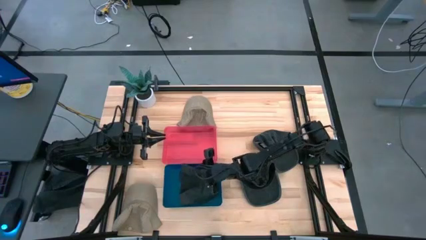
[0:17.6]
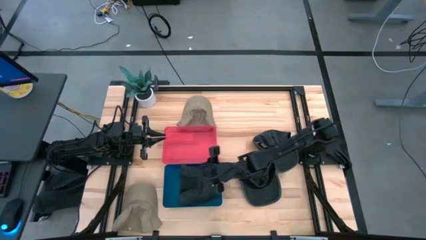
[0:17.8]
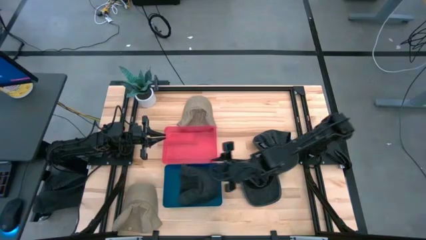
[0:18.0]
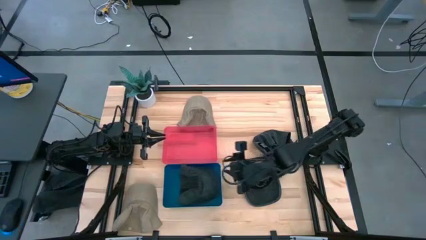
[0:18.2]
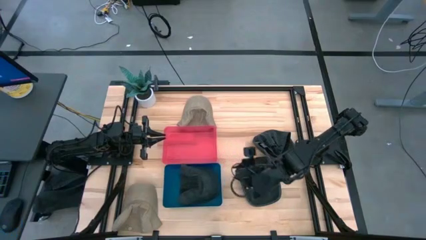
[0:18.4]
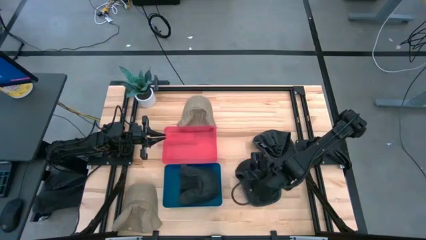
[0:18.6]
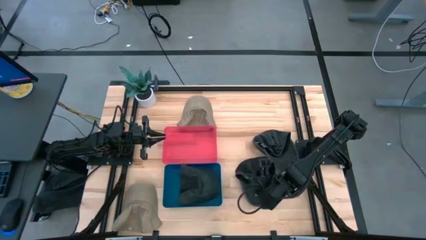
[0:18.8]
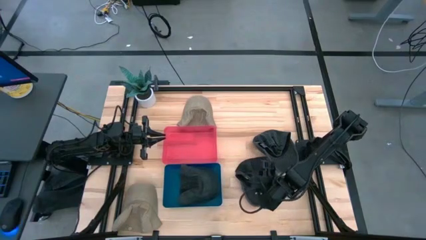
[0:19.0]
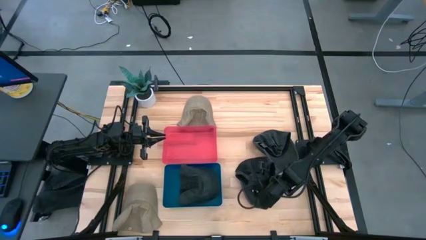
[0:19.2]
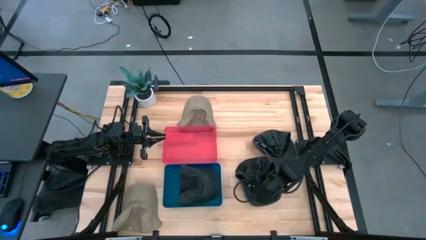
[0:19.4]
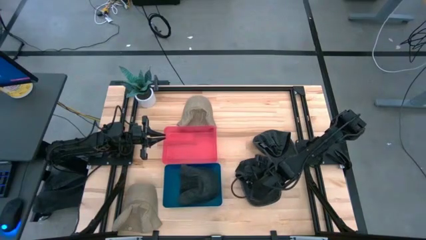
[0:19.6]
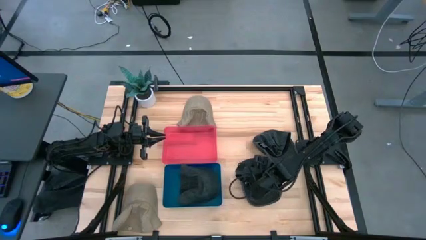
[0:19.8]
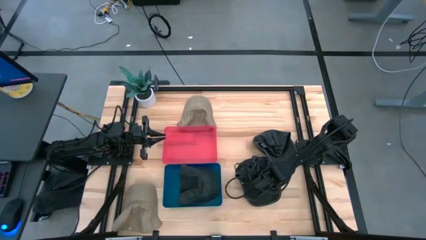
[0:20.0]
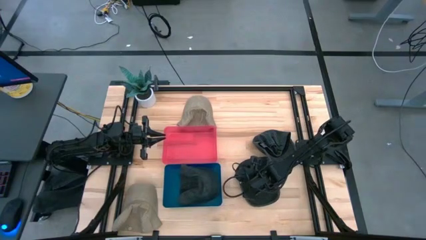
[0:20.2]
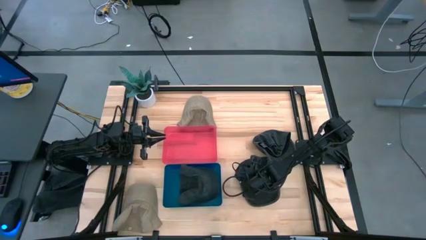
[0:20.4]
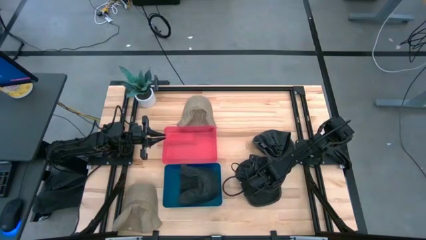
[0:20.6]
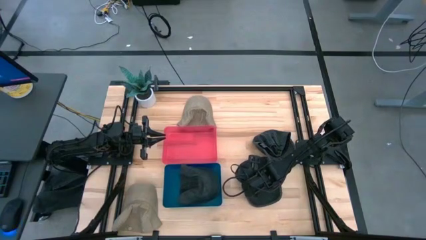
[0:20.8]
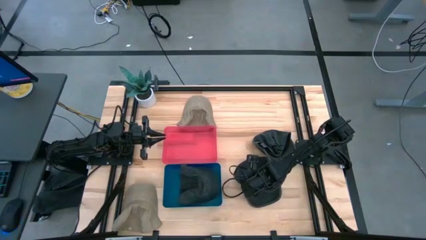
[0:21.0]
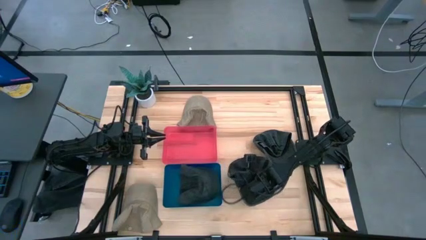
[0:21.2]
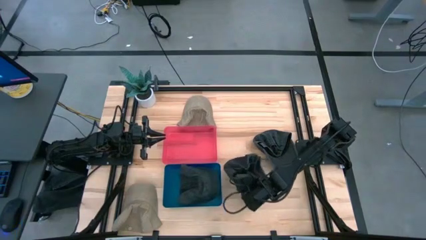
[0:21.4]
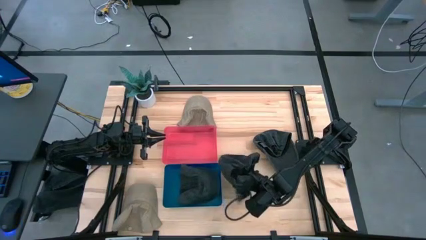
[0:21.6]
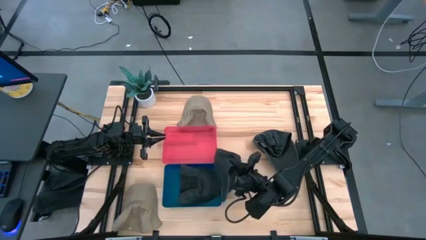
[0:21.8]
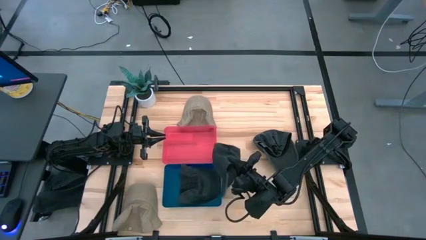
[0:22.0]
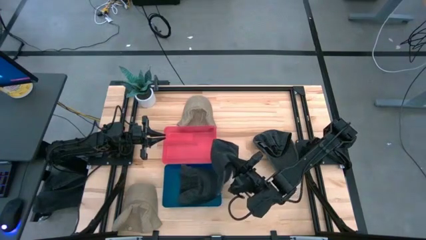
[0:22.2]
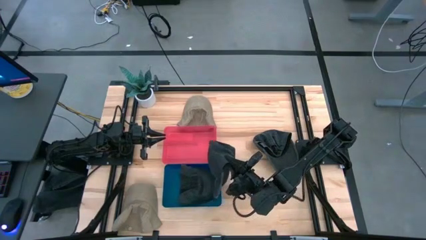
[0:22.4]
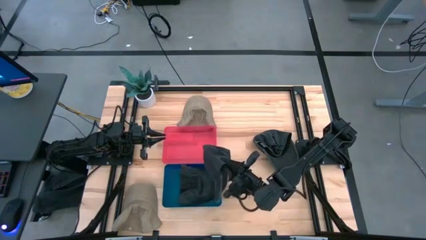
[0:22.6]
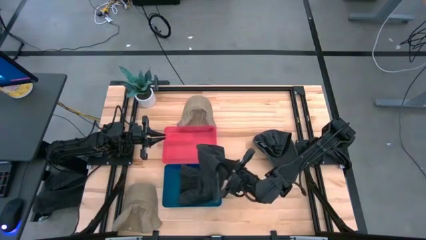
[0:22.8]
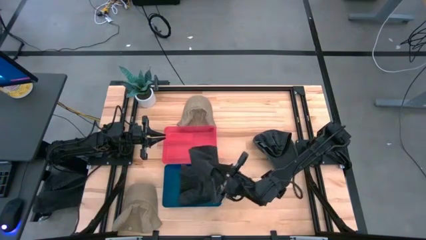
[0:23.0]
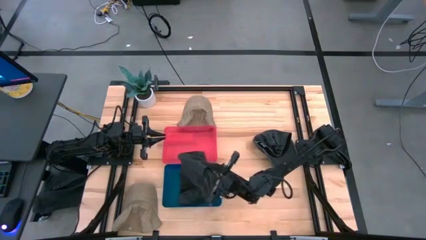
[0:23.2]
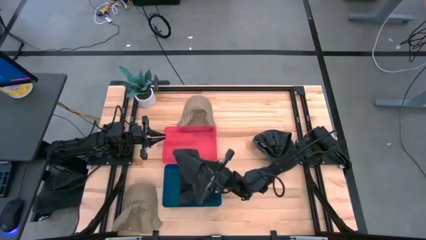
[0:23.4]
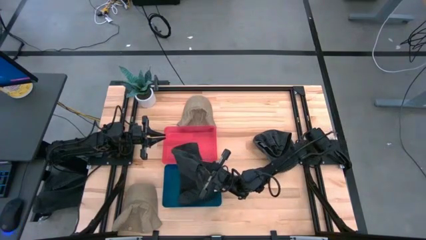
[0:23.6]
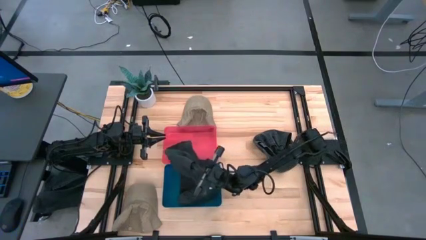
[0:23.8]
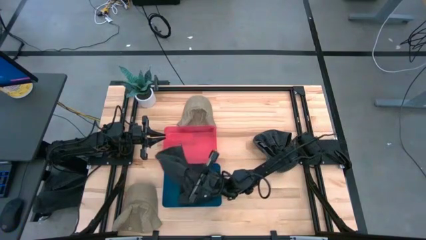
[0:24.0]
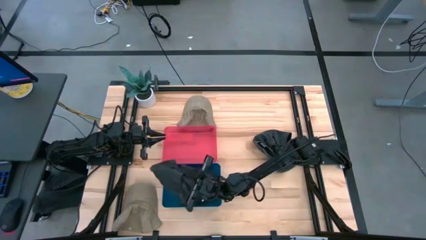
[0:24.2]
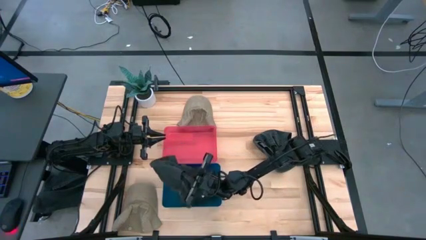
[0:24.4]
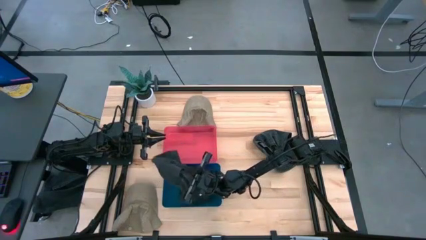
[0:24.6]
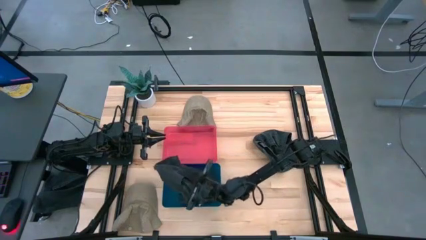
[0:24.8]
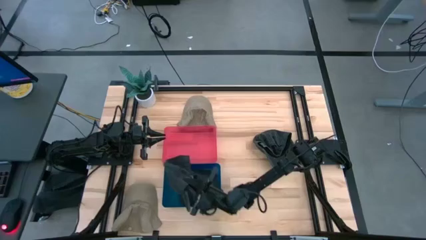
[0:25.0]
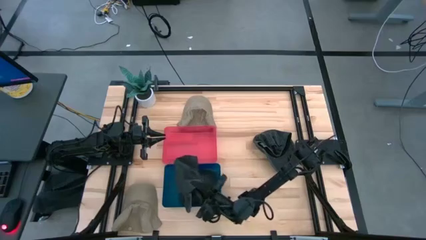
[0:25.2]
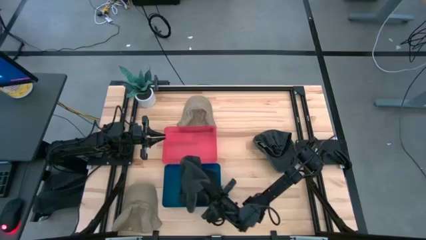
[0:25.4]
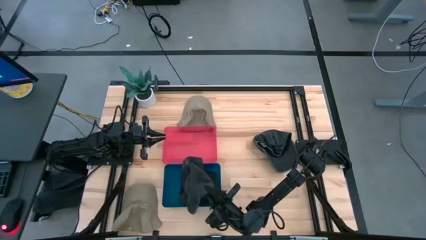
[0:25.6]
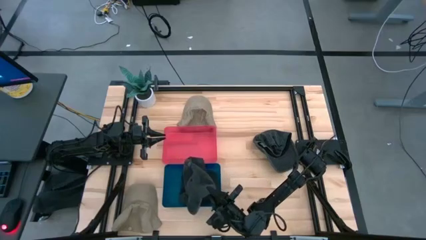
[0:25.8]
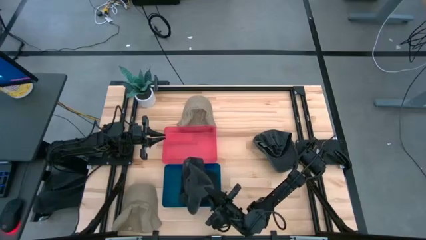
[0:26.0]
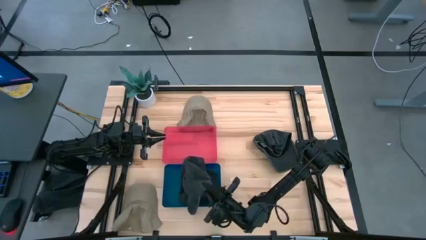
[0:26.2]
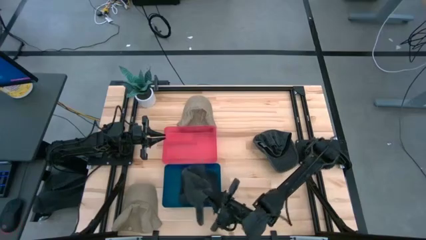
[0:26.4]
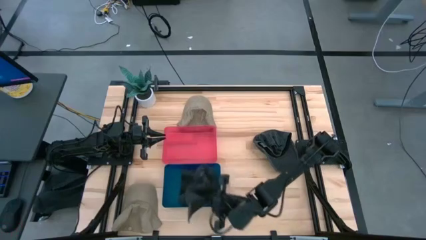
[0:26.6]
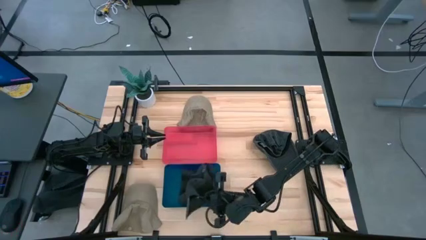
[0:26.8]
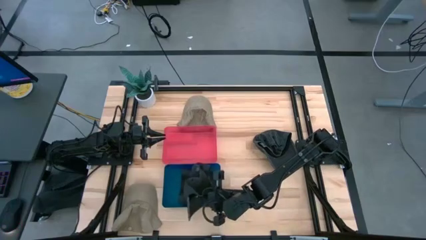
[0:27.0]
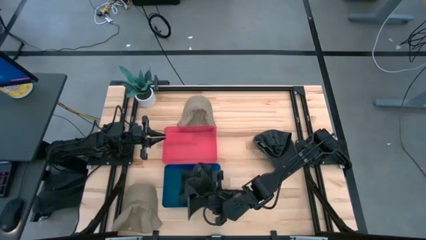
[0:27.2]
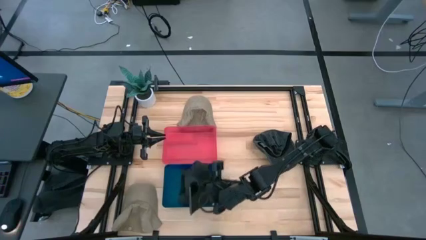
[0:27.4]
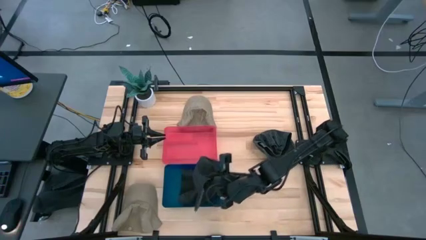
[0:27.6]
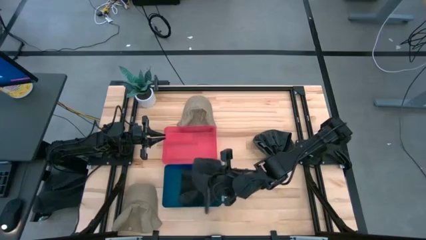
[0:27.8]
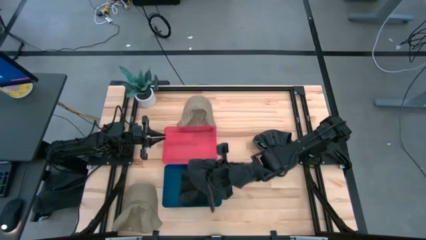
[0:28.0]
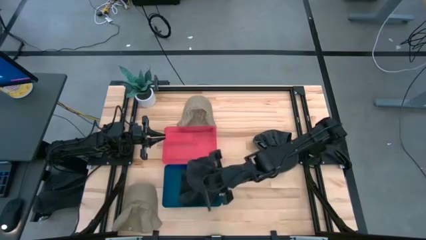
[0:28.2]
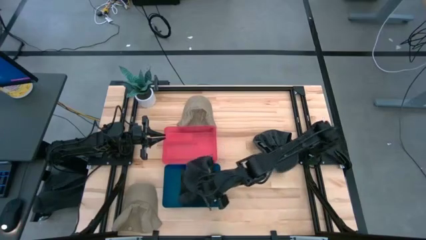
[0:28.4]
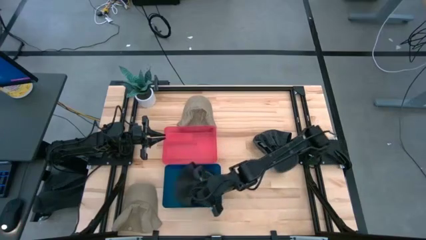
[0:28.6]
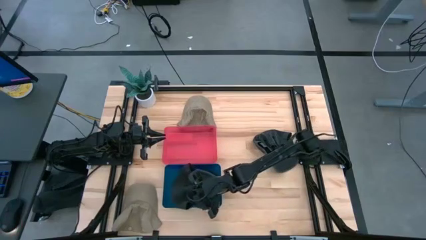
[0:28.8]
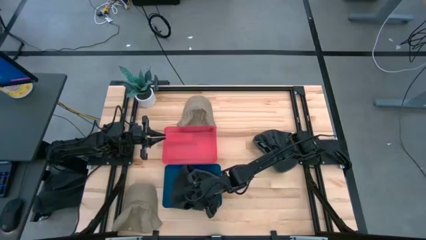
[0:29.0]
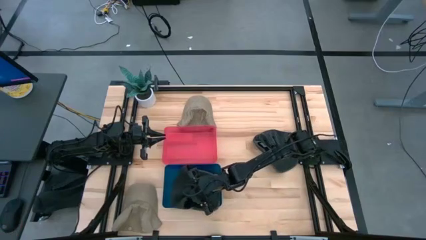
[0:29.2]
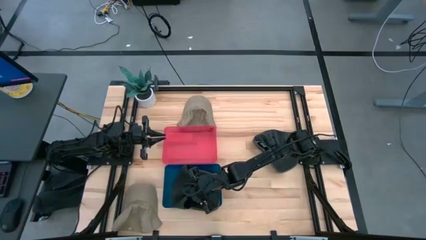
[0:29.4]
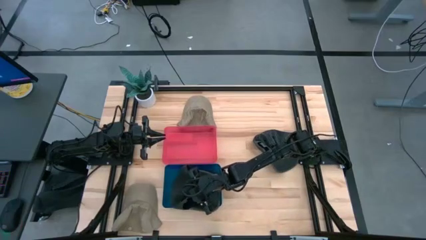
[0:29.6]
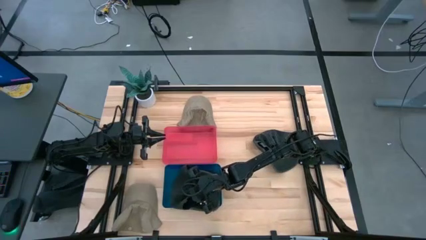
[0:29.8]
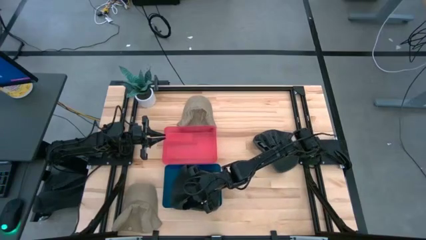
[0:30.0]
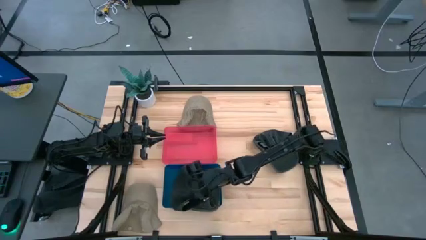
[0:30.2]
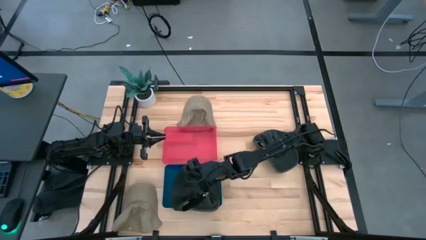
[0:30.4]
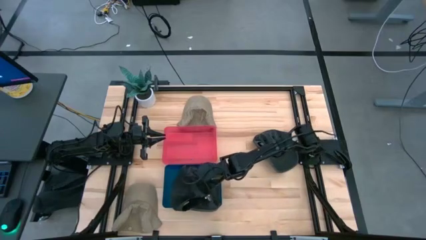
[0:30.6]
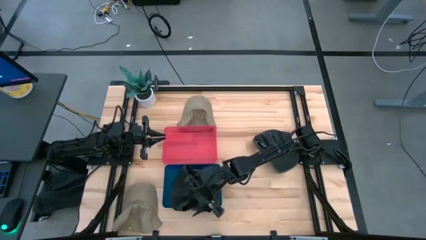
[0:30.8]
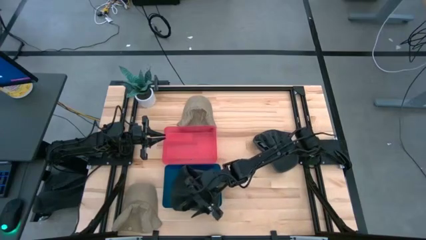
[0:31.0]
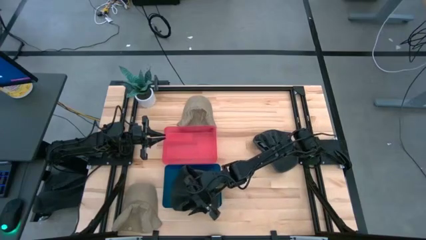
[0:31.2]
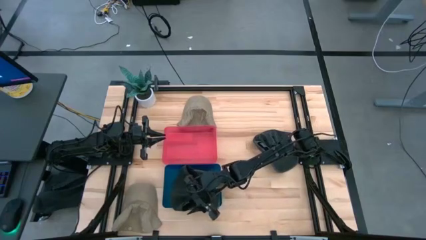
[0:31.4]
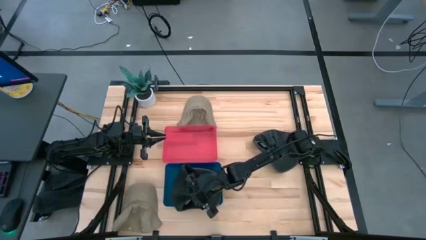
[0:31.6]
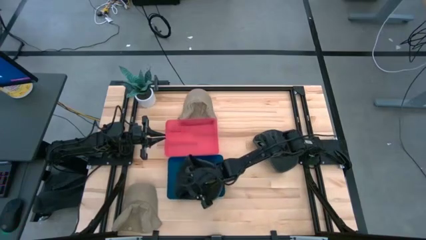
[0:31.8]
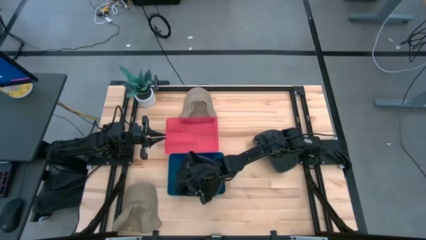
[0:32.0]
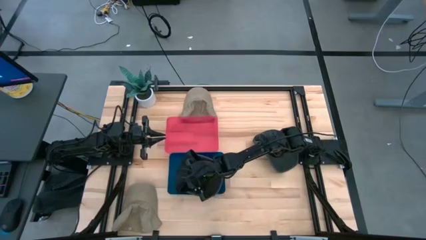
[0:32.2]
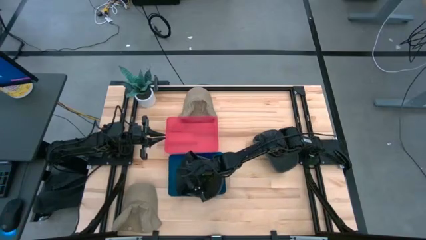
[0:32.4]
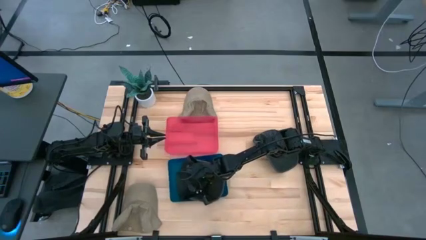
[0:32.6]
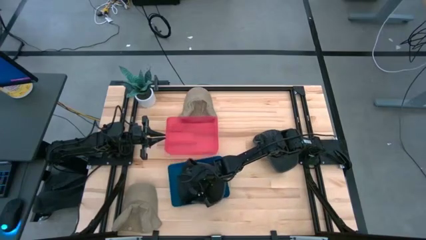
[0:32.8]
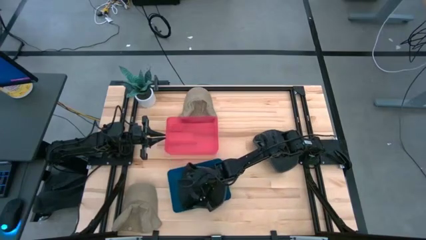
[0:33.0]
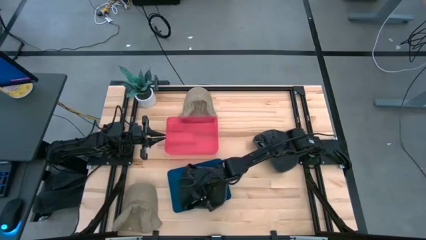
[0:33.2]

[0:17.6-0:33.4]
Task: Pick & Place hat
Put the bottom black cap into the blue bin
